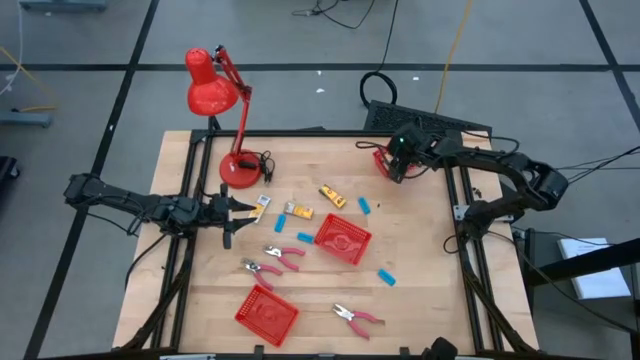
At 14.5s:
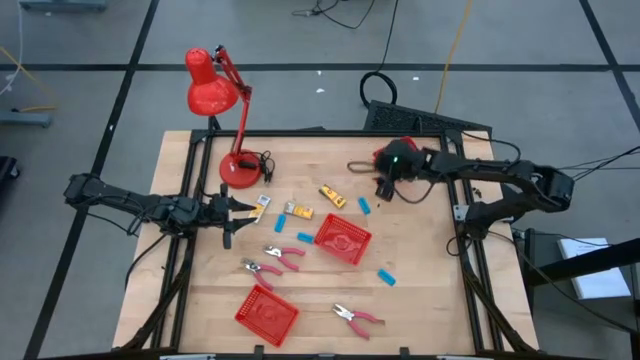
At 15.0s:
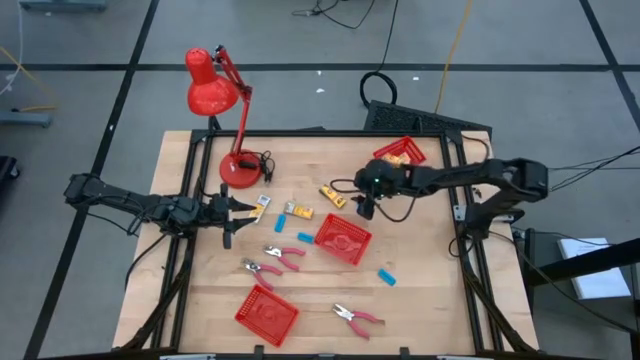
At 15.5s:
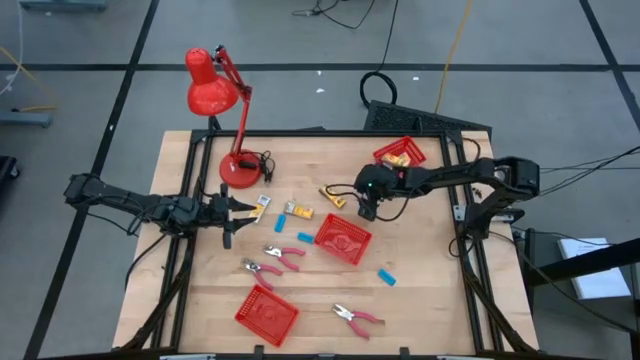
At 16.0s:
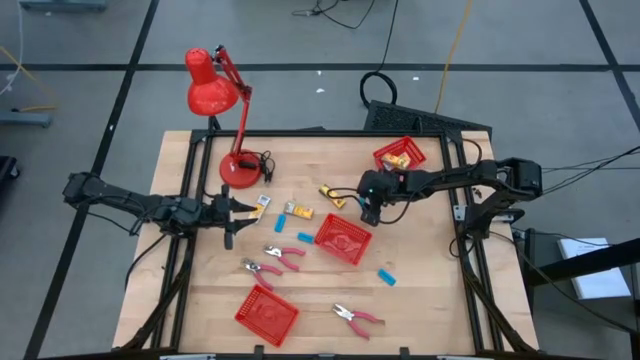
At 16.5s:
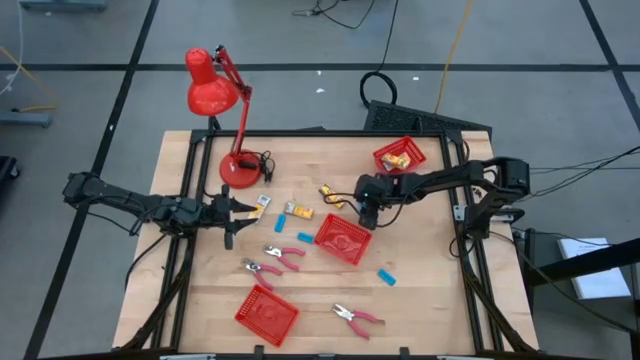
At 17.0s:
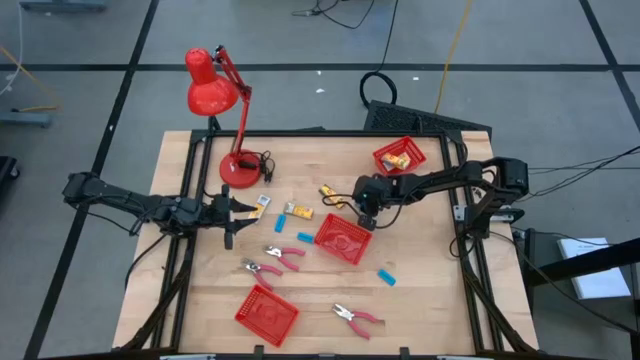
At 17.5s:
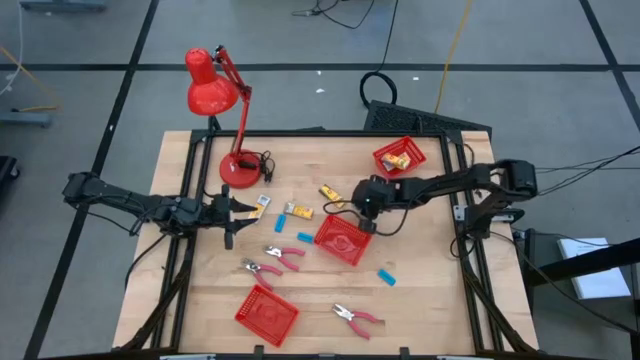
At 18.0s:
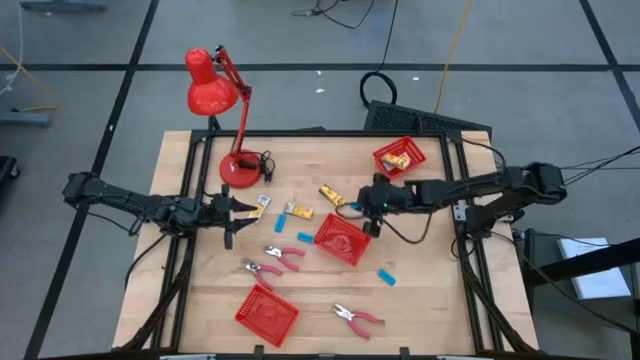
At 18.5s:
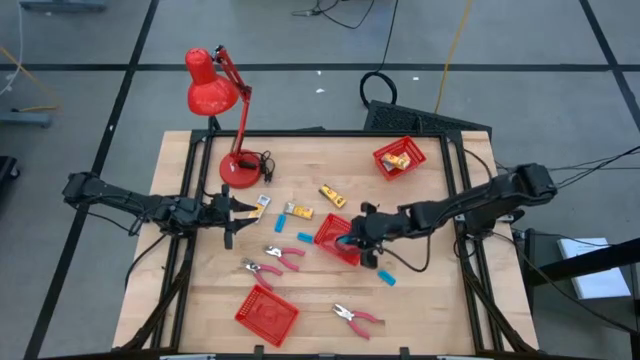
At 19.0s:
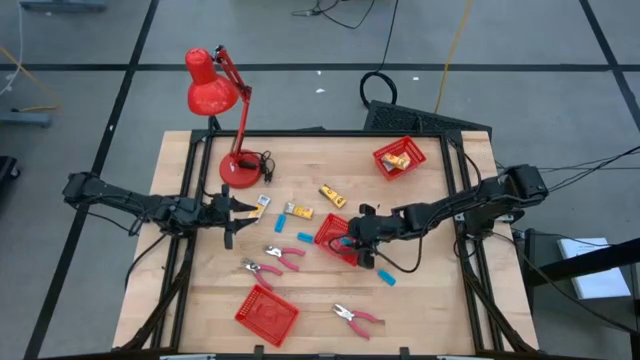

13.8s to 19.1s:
Task: Pick & Place School Supplies
Put the blue eraser into the middle red bin

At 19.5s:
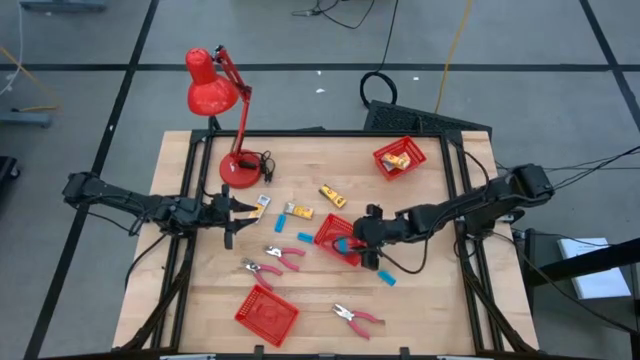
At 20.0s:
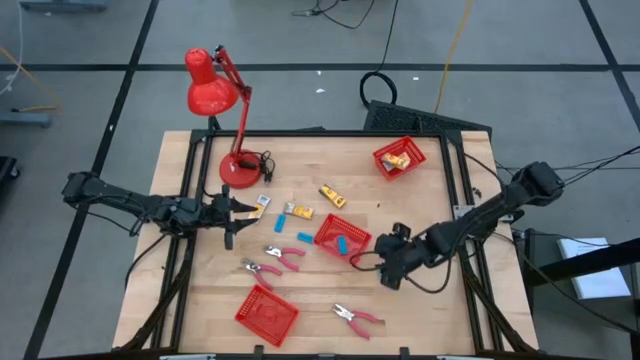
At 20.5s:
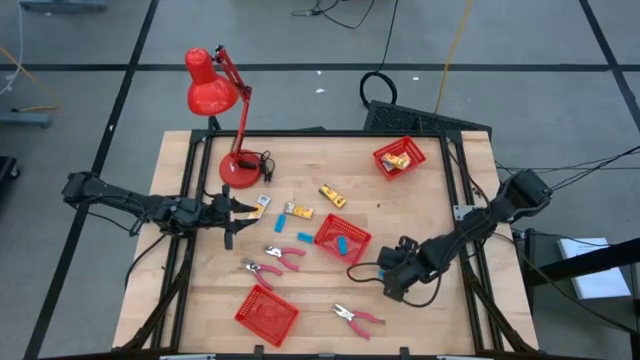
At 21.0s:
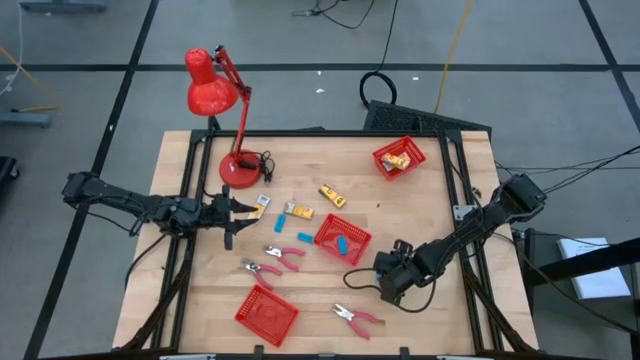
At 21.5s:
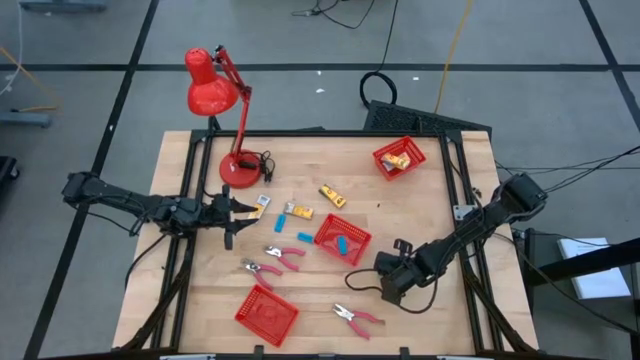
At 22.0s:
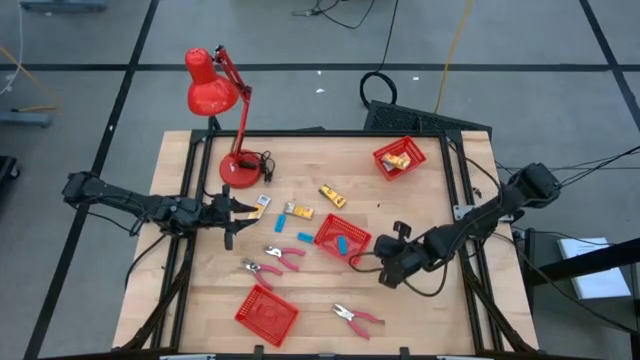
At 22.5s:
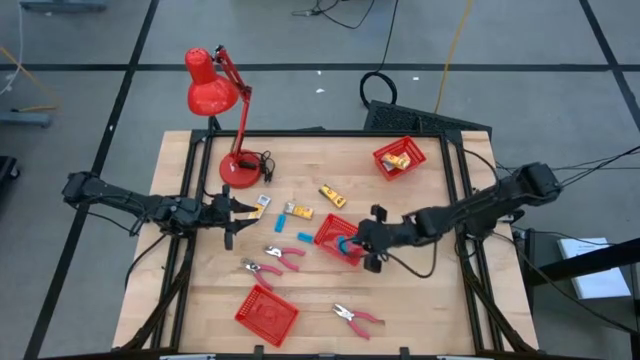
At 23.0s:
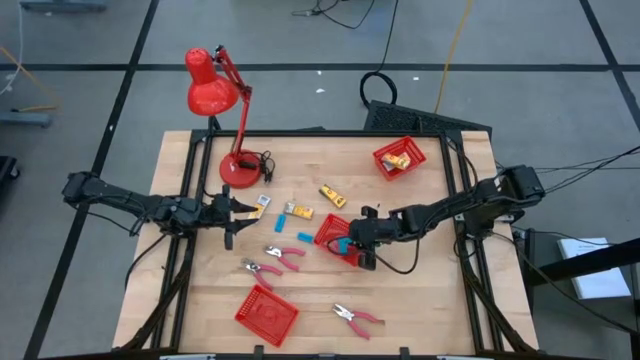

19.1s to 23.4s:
Put the blue eraser into the middle red bin

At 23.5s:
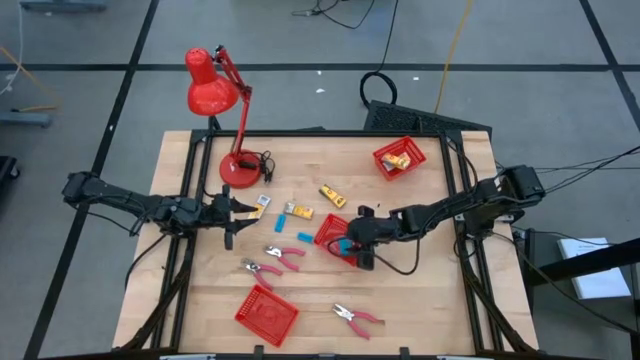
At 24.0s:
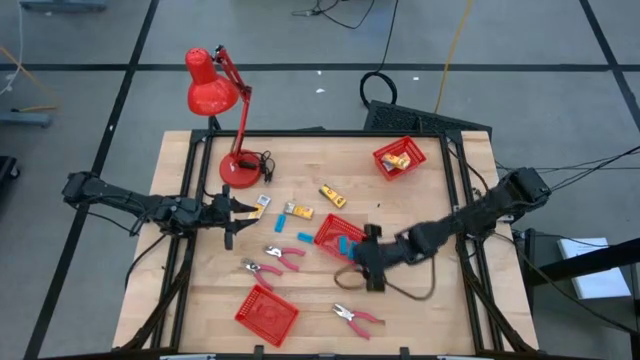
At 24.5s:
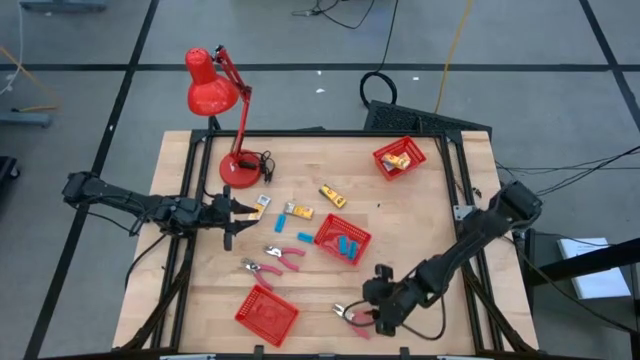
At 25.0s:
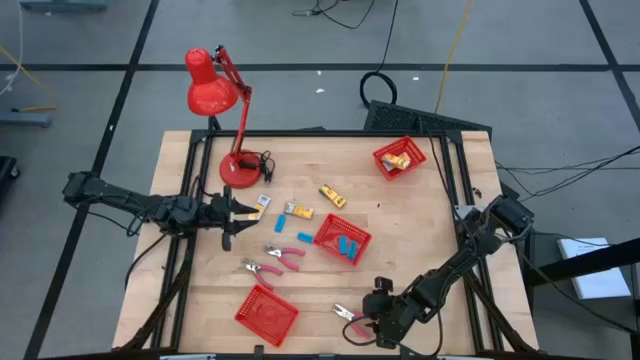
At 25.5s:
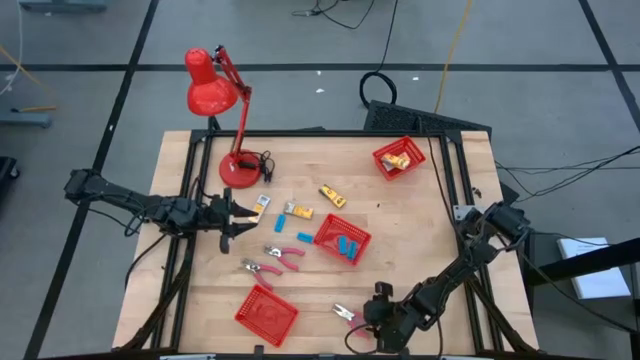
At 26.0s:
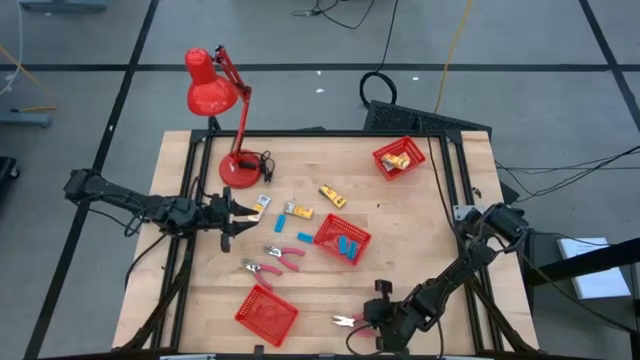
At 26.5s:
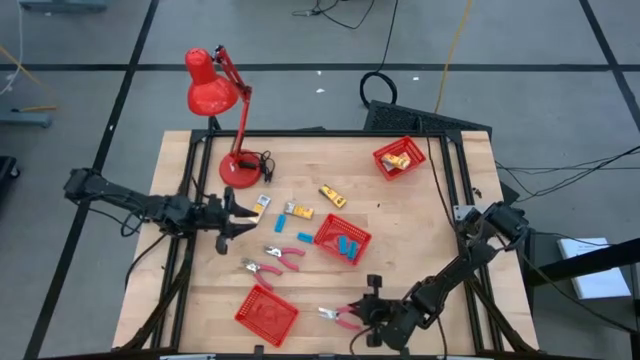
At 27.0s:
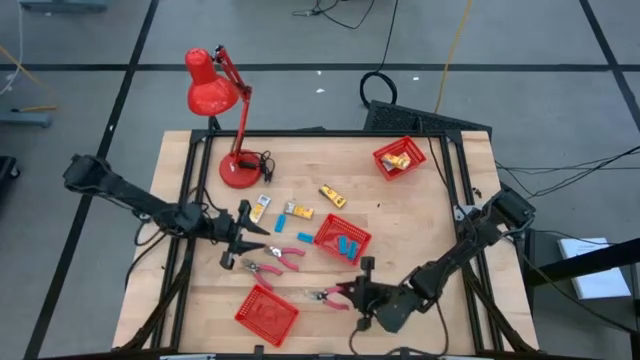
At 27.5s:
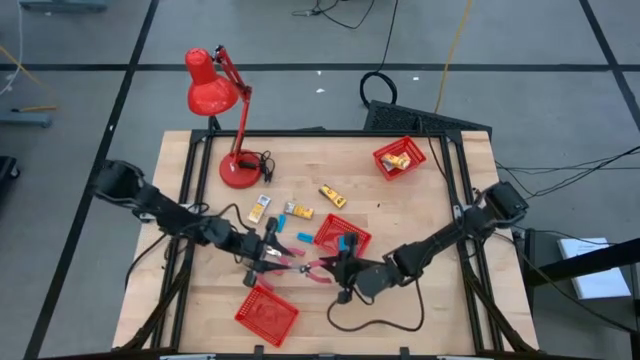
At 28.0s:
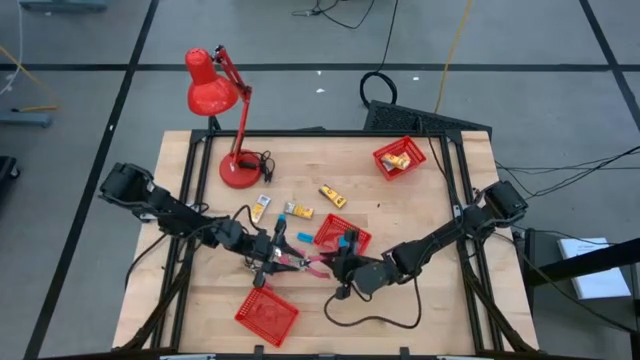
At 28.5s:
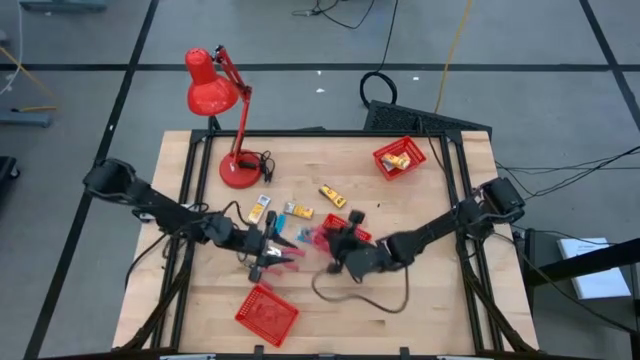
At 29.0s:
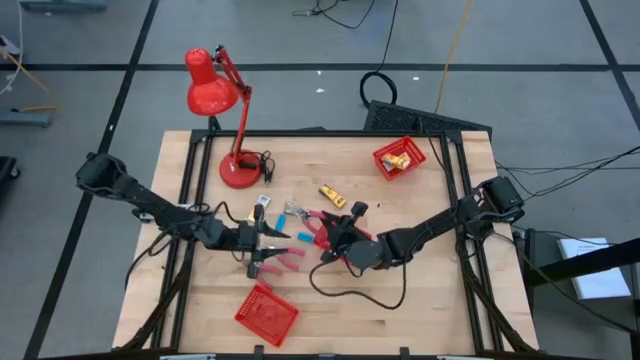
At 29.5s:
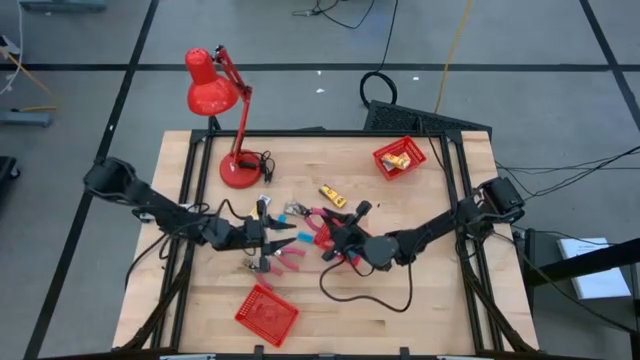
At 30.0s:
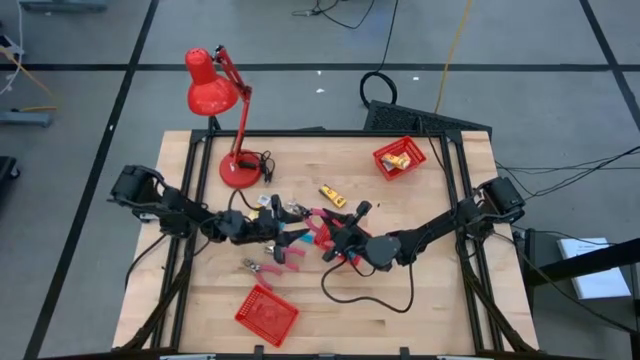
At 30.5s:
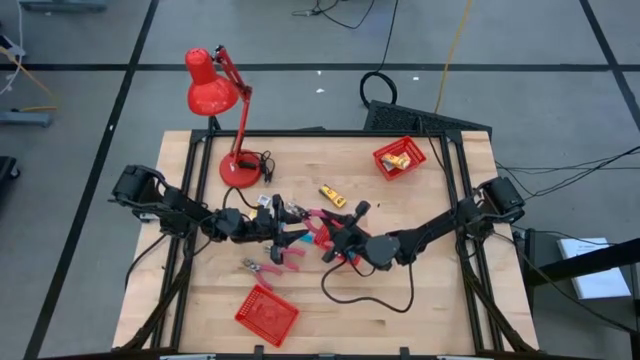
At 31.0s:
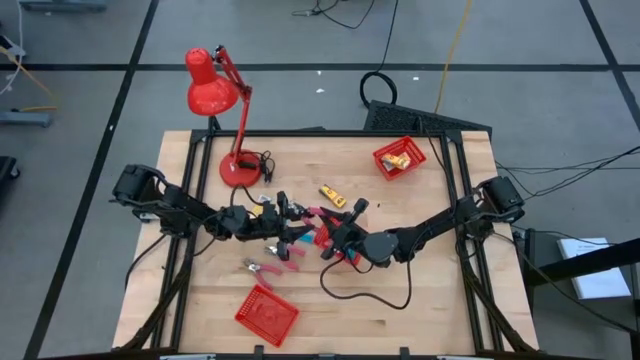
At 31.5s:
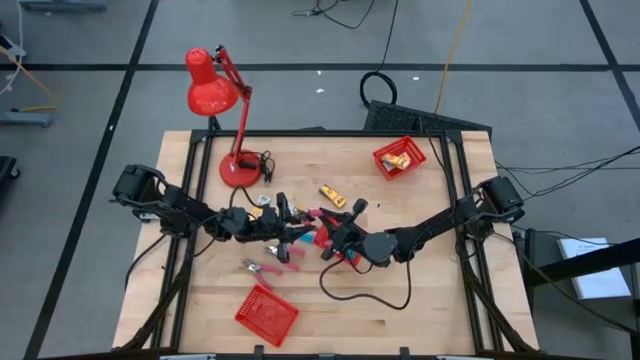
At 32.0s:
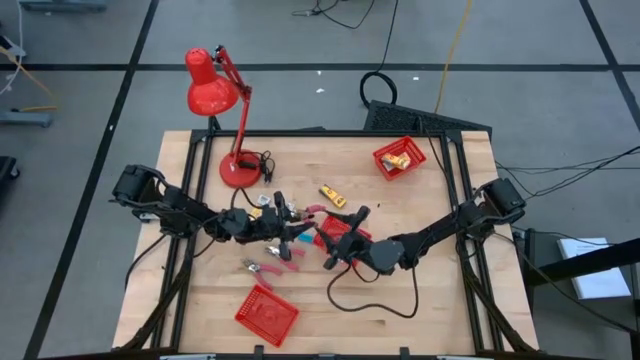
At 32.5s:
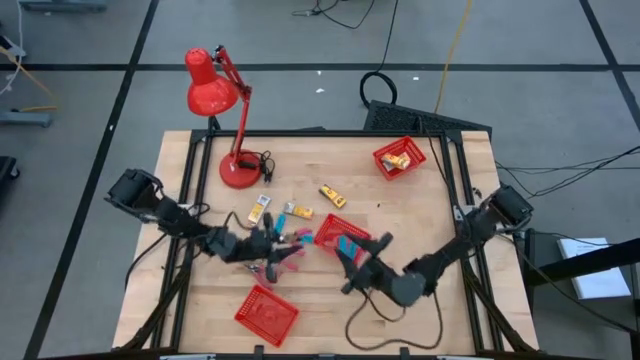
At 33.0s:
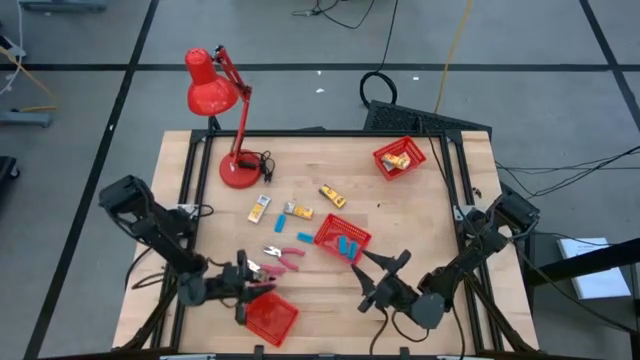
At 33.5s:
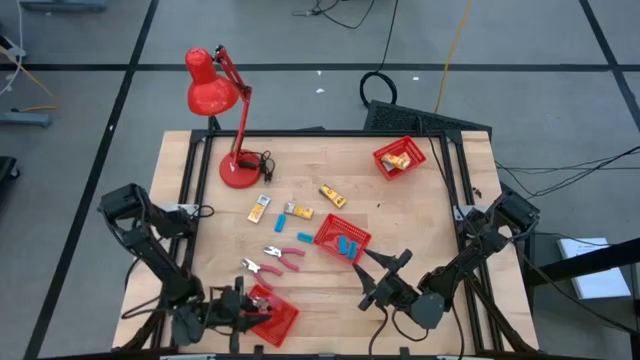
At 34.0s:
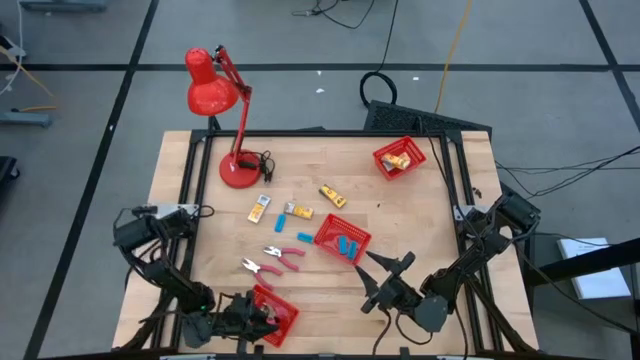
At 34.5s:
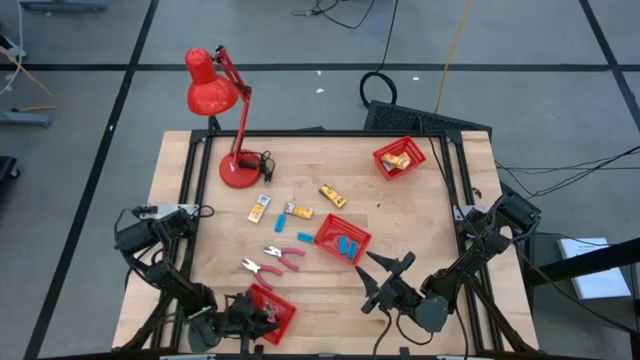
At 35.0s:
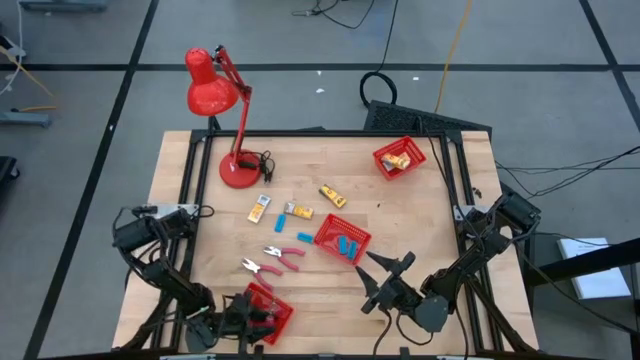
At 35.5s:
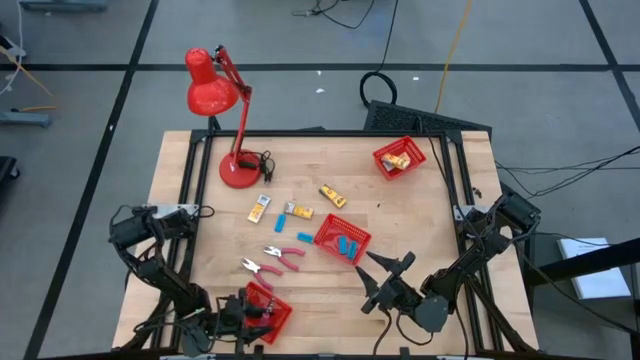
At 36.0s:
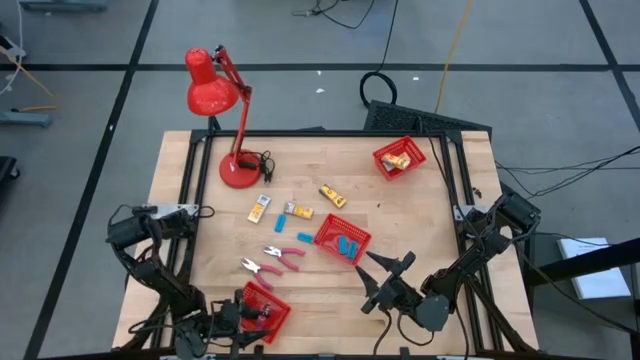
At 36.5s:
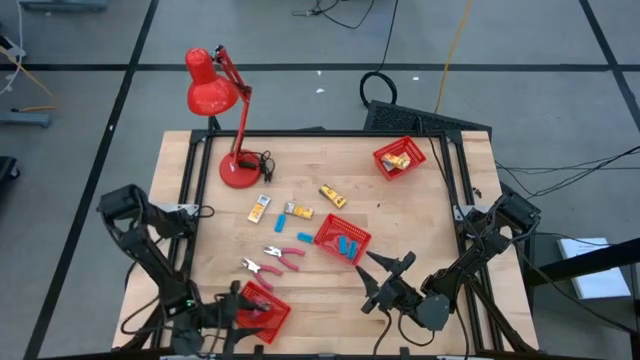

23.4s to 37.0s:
Put the pink hole puncher into the bottom red bin
